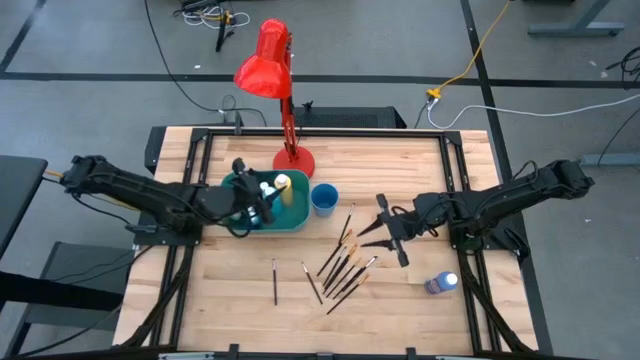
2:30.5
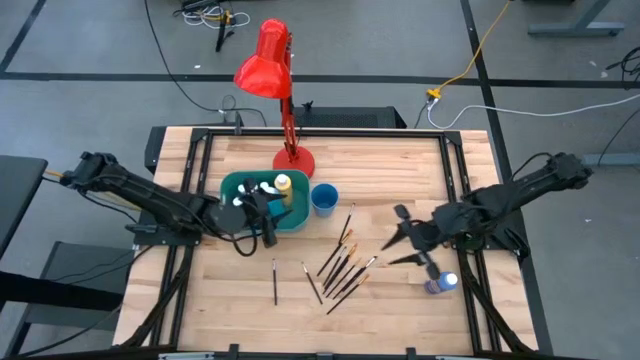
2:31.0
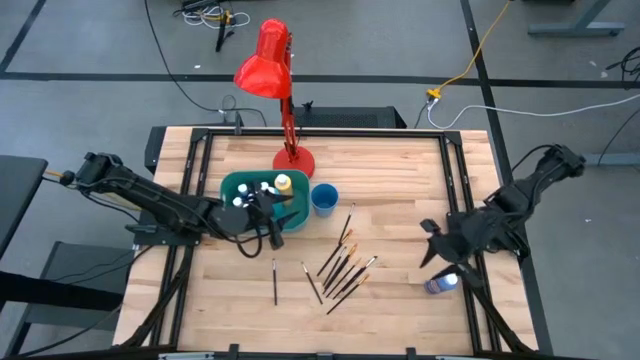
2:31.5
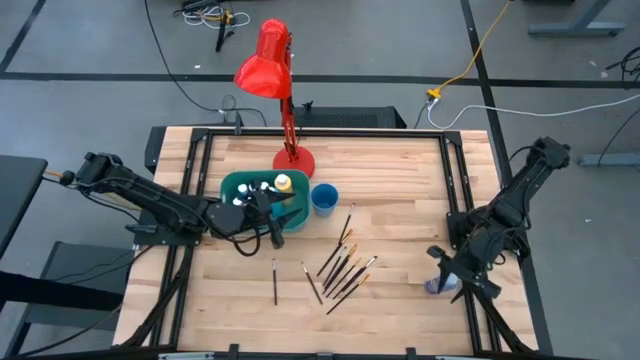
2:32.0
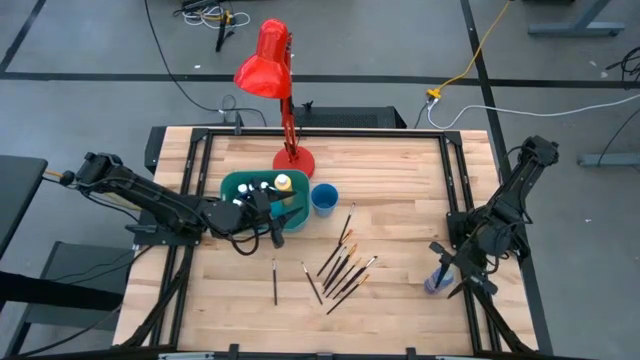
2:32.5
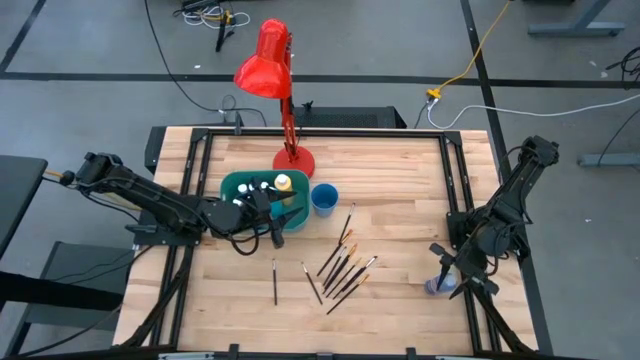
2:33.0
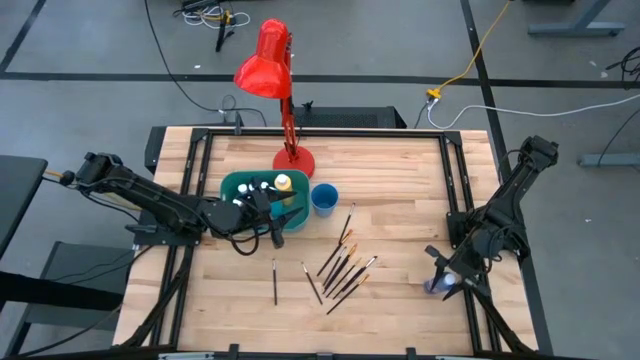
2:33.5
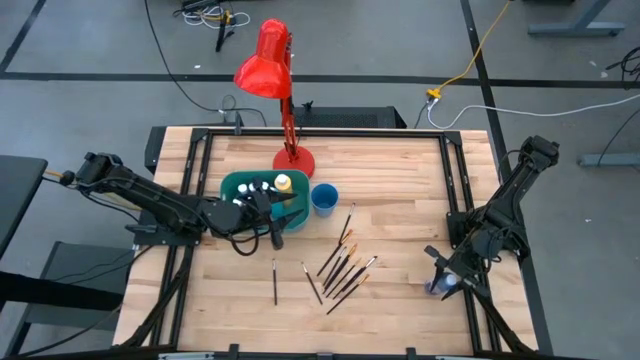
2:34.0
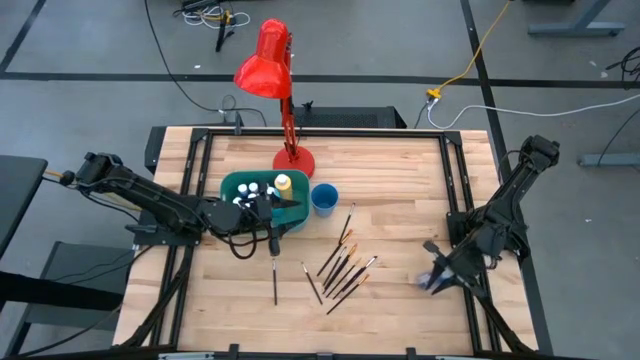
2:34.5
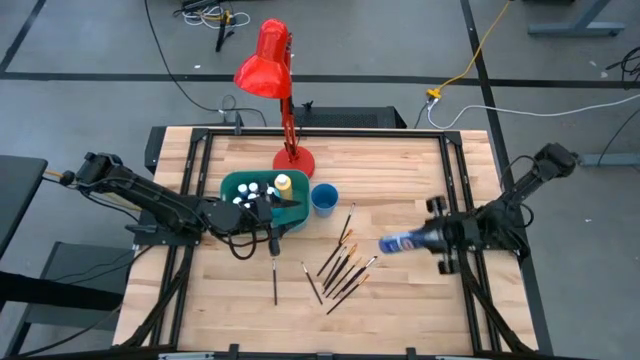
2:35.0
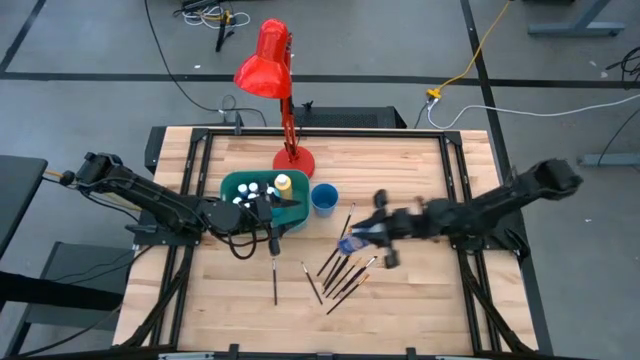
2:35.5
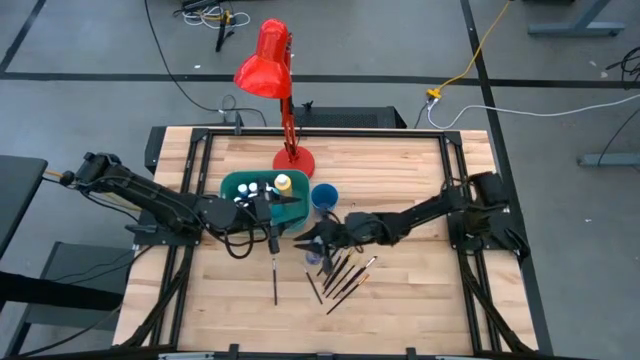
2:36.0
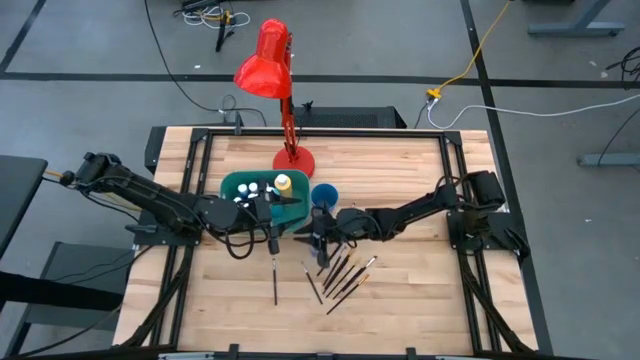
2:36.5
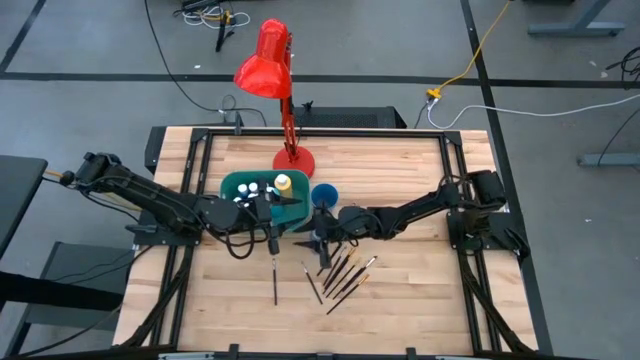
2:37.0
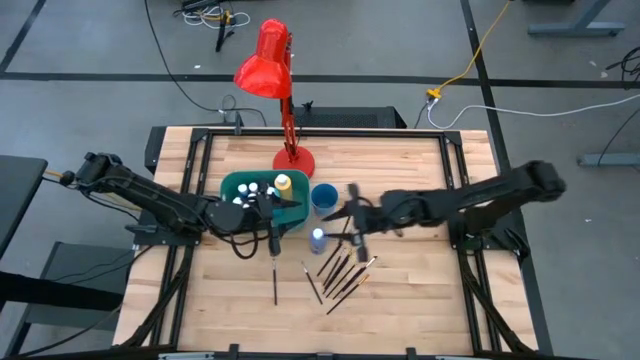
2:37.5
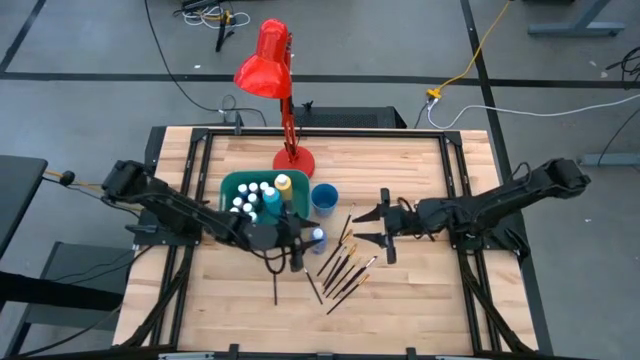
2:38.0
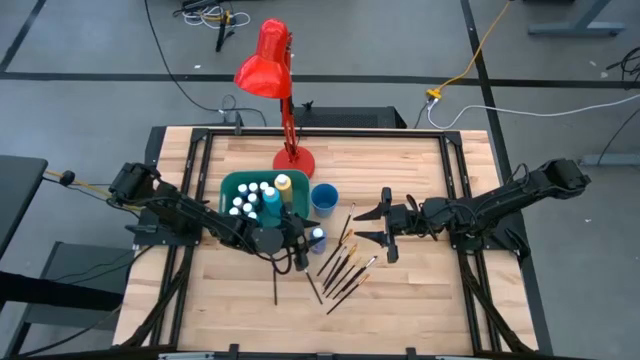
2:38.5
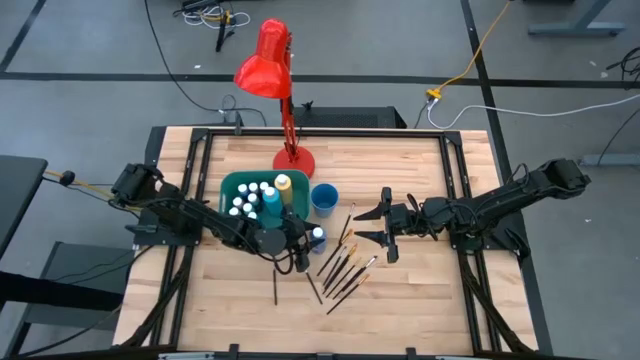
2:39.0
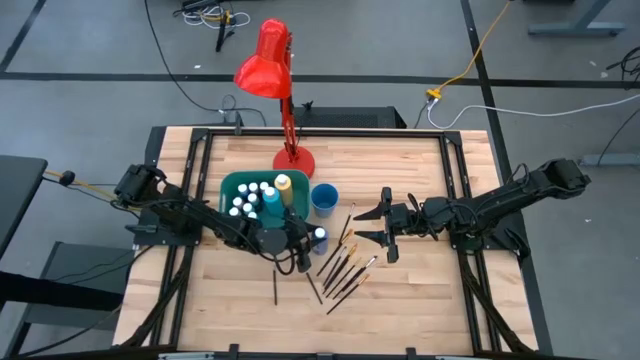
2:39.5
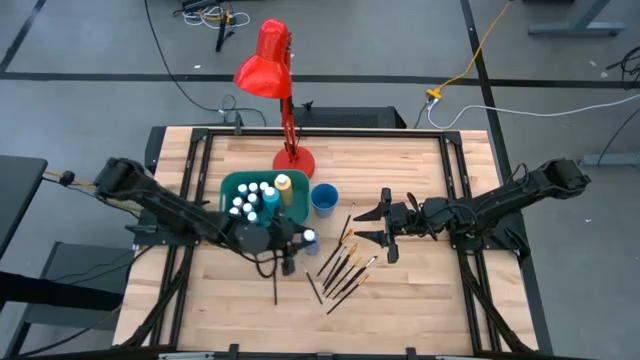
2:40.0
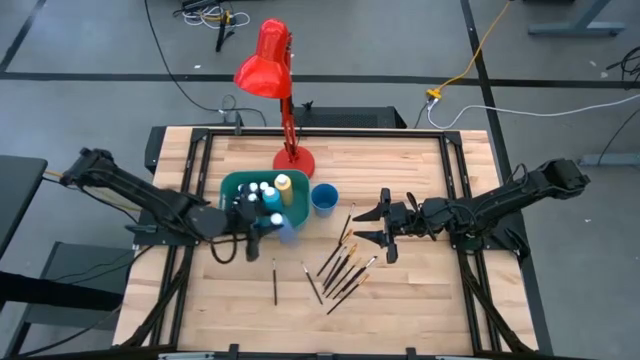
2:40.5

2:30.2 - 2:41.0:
Task: Pick & Place Paint Supplies
Put the light blue paint bottle into the green bin

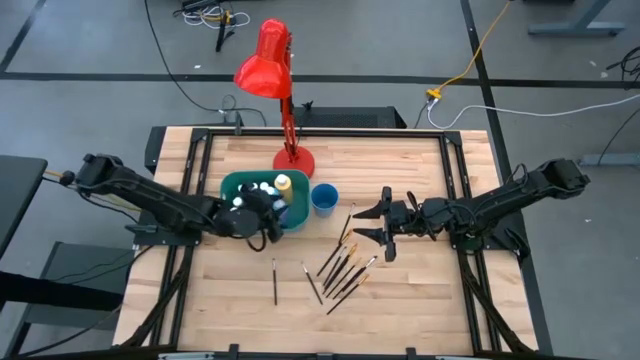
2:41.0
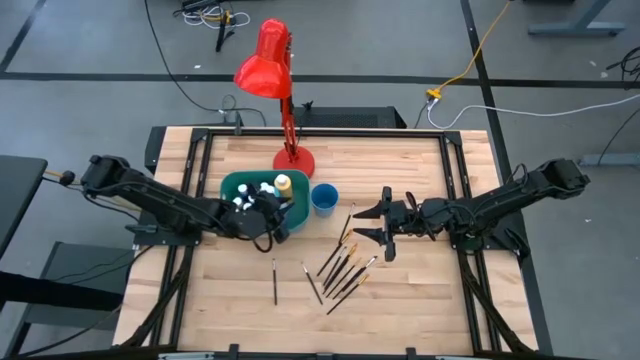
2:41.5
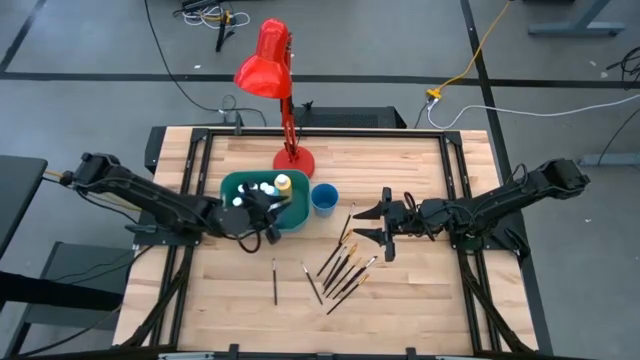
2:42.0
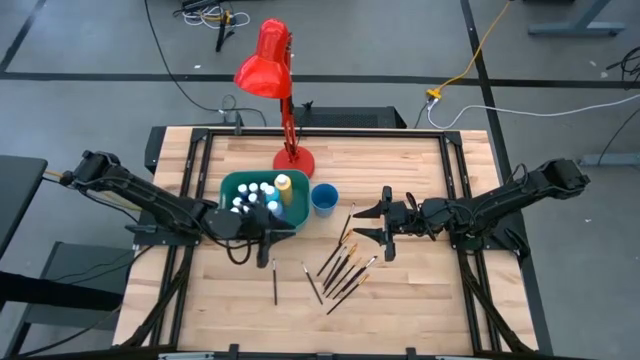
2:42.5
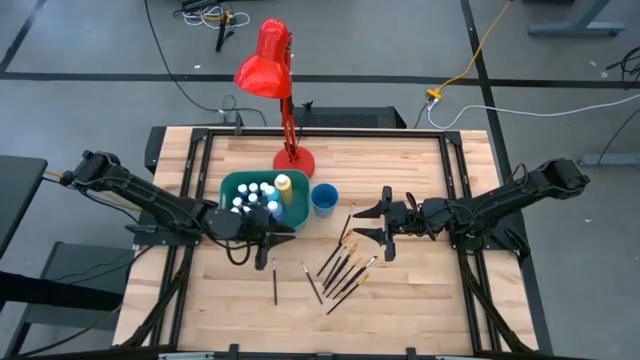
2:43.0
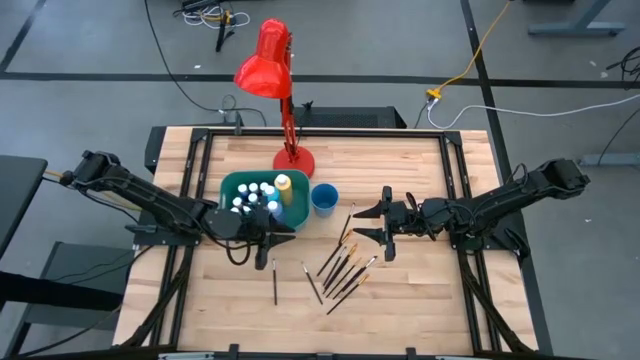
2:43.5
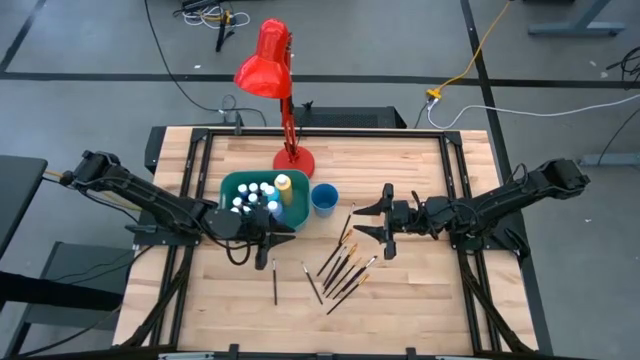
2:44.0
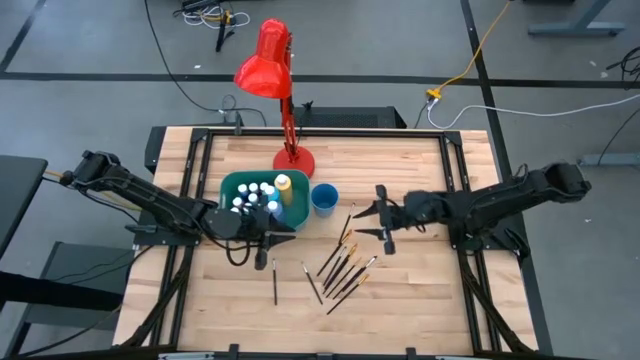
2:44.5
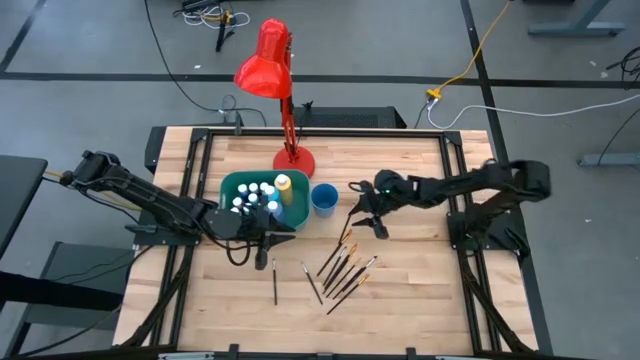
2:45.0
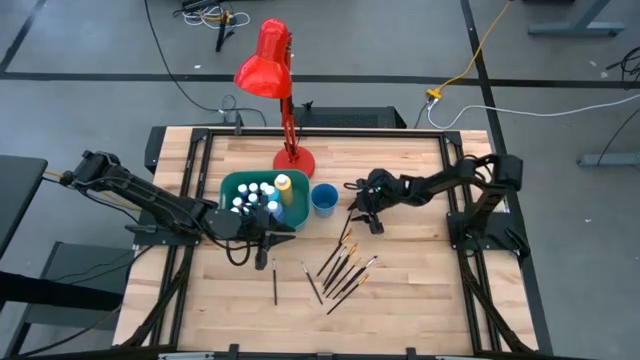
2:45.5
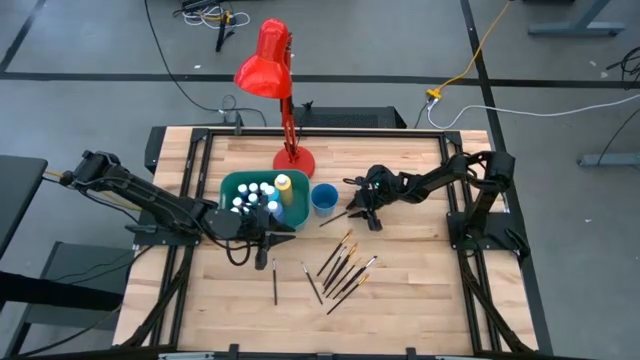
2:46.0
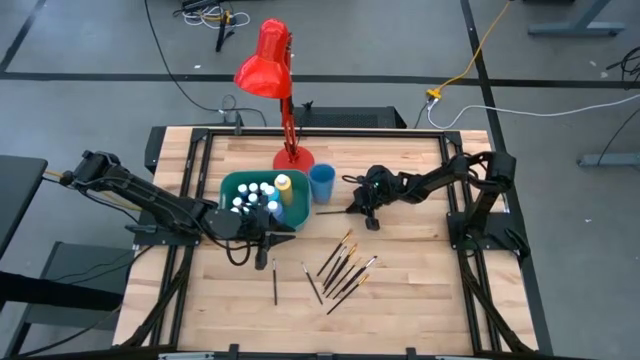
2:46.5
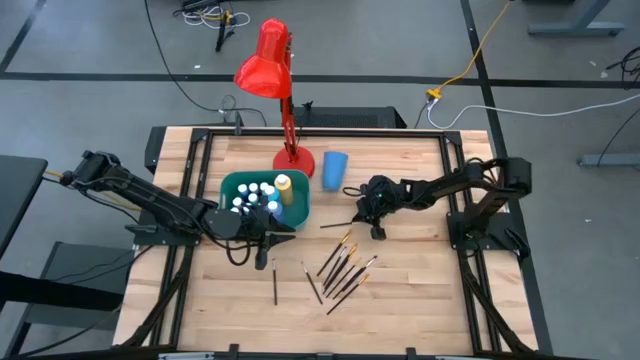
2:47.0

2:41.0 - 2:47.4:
Put the black silver paint brush into the blue cup

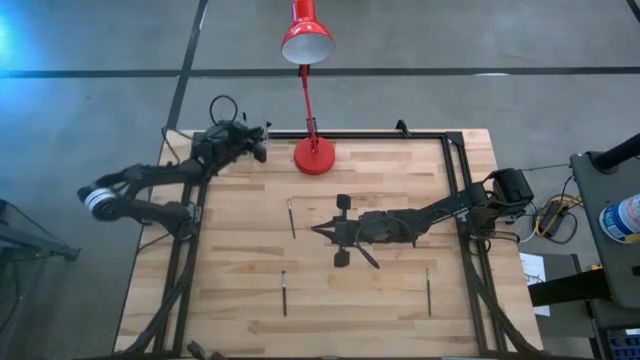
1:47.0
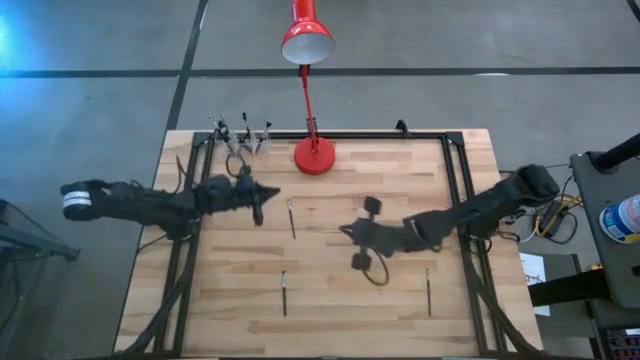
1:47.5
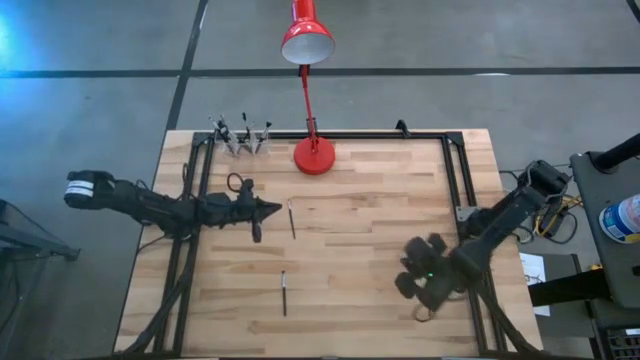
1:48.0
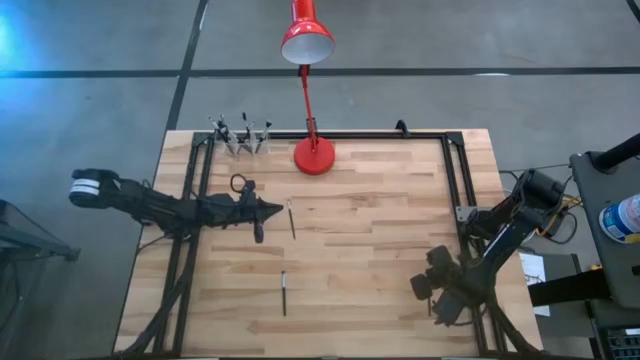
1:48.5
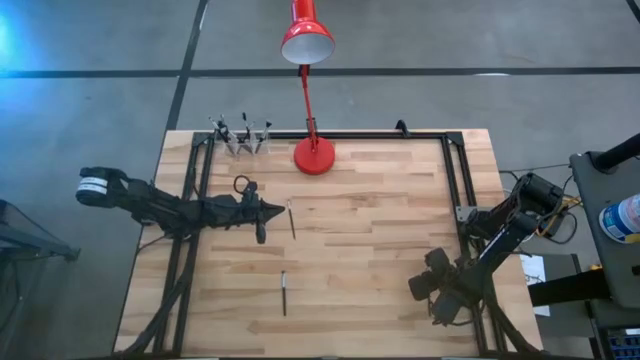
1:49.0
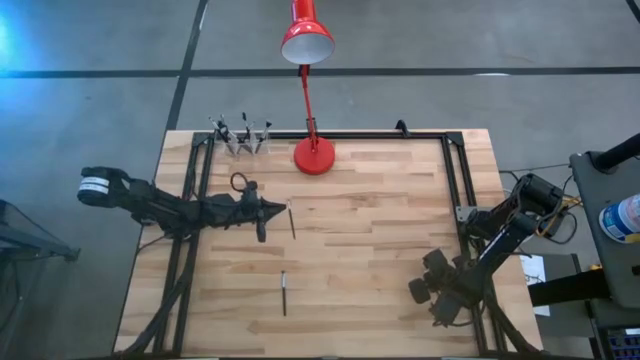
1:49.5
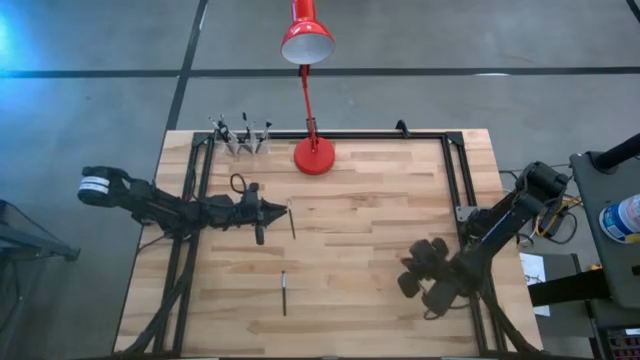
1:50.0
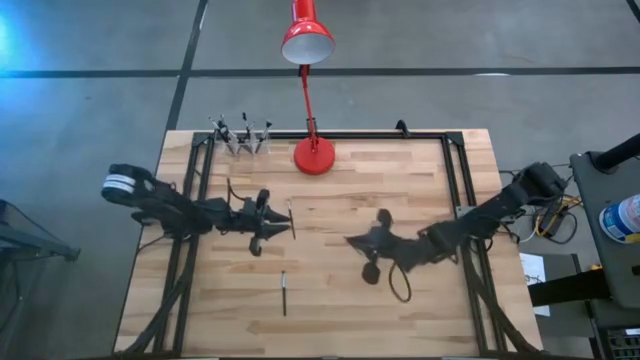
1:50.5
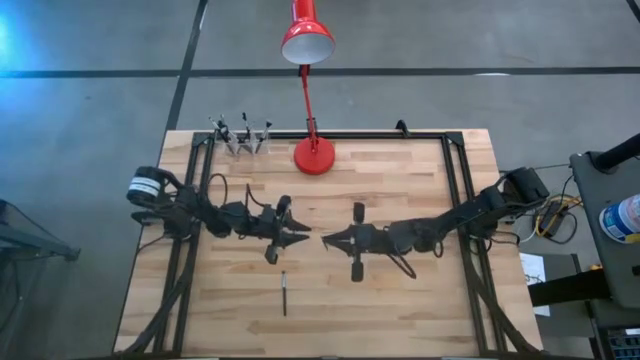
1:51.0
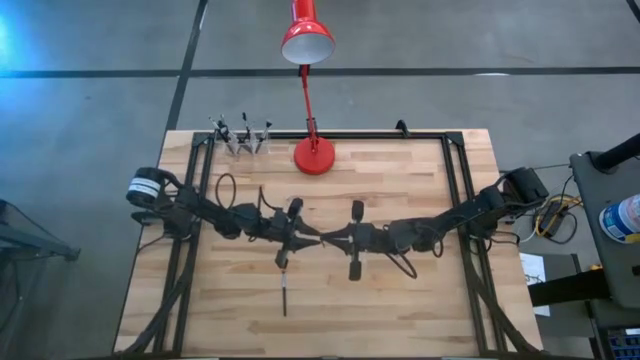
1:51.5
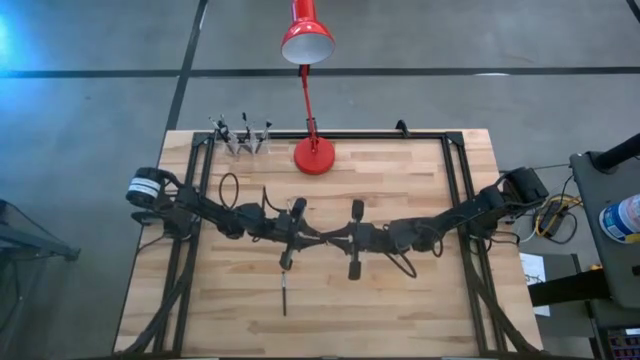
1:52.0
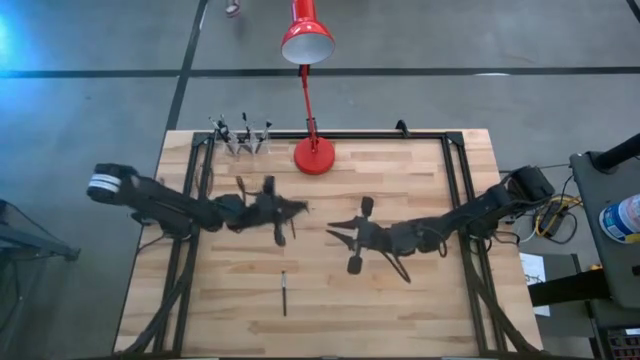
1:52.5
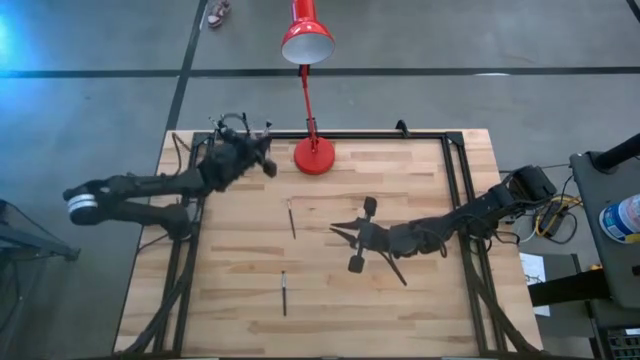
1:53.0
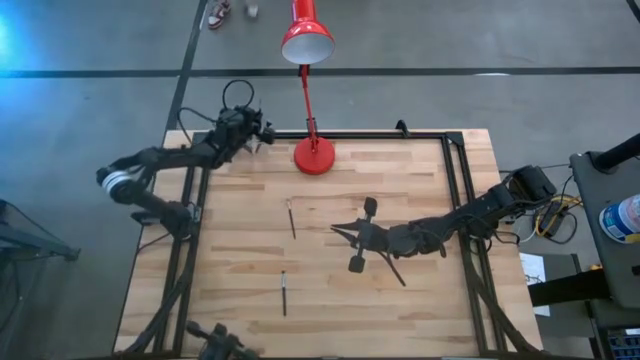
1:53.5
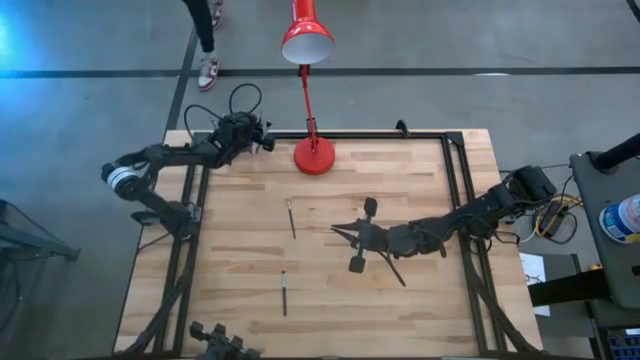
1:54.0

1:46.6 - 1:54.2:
Task: Pick & Place Makeup Supplies
Put the makeup brush into the transparent organizer
